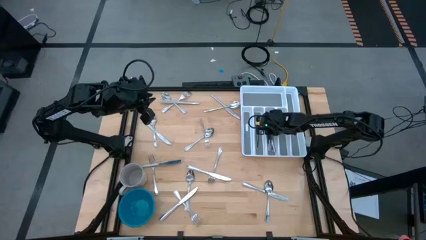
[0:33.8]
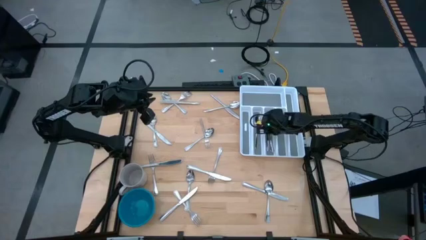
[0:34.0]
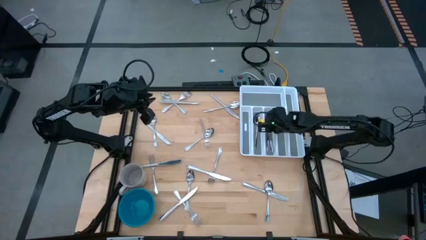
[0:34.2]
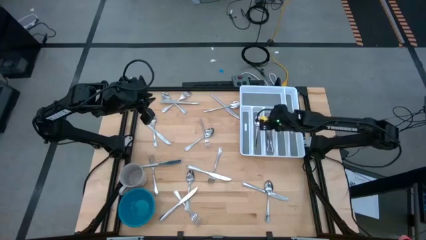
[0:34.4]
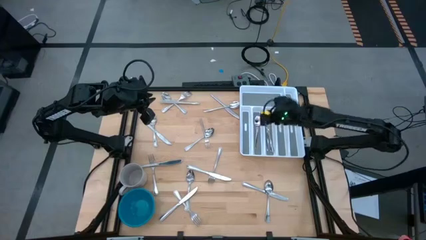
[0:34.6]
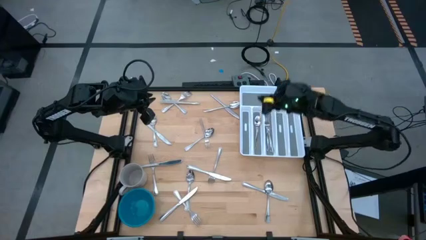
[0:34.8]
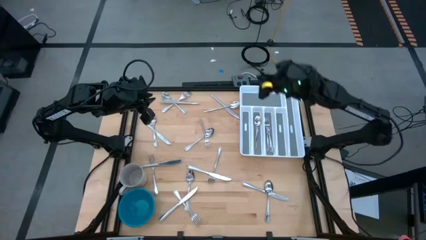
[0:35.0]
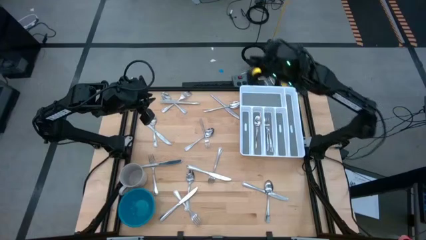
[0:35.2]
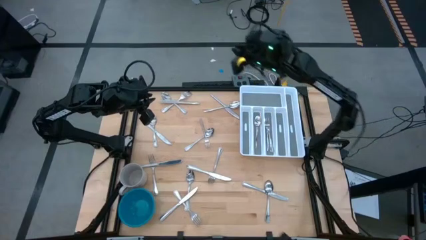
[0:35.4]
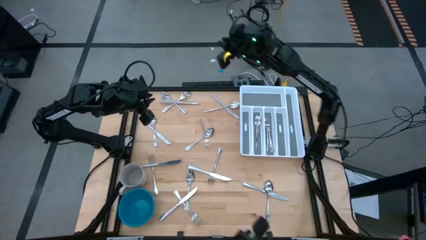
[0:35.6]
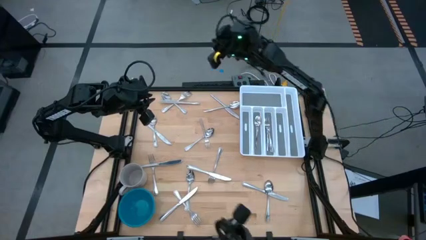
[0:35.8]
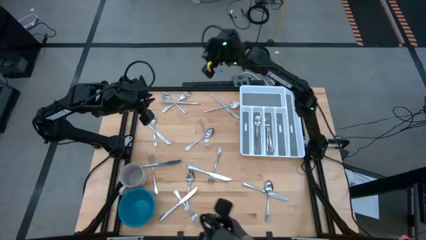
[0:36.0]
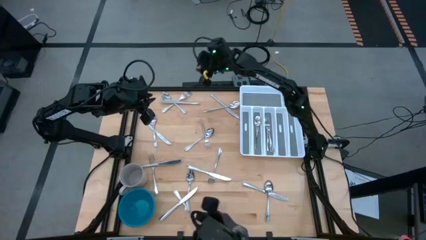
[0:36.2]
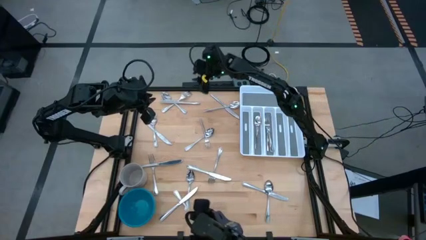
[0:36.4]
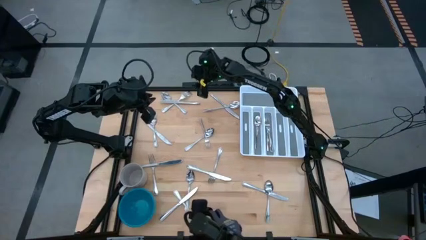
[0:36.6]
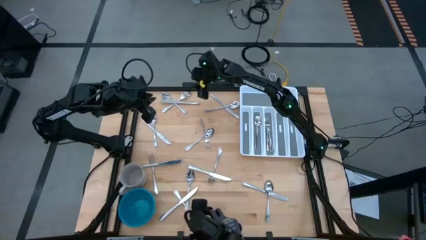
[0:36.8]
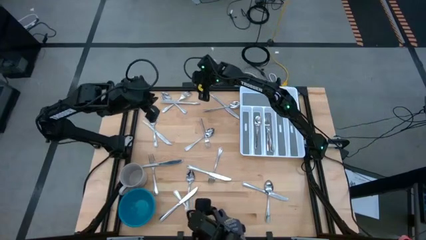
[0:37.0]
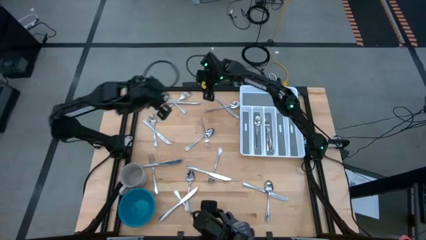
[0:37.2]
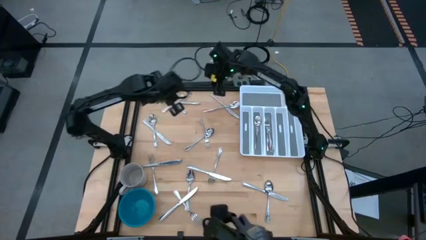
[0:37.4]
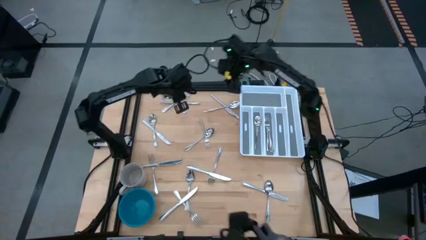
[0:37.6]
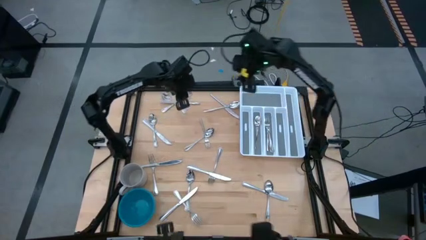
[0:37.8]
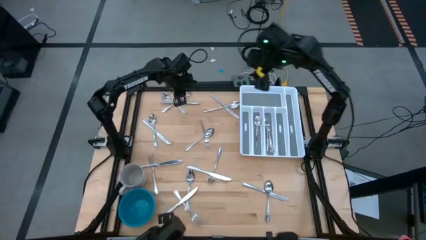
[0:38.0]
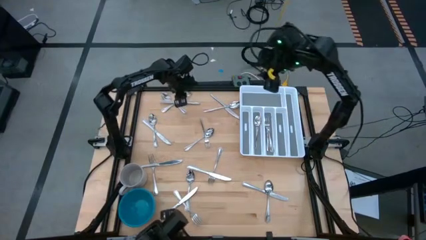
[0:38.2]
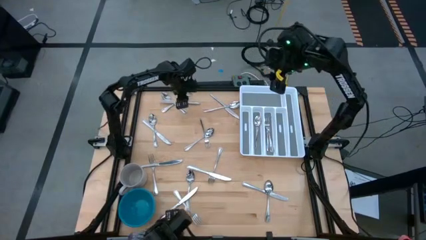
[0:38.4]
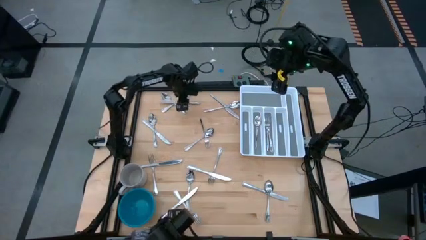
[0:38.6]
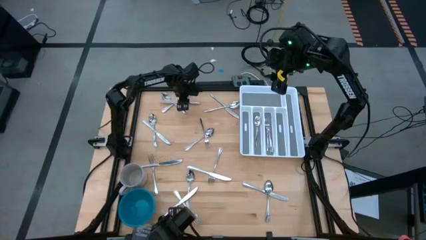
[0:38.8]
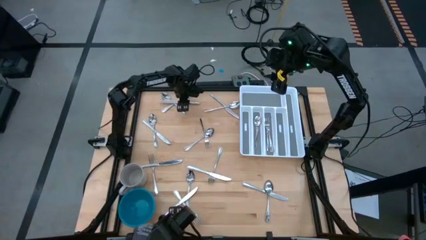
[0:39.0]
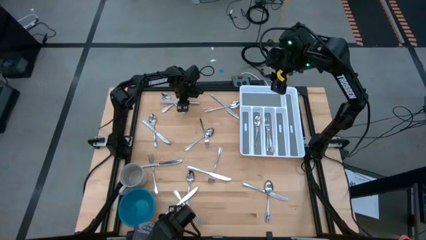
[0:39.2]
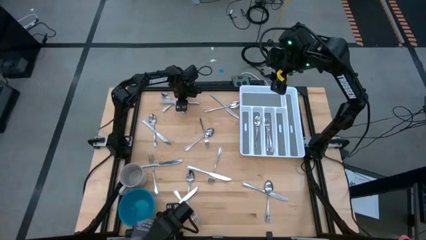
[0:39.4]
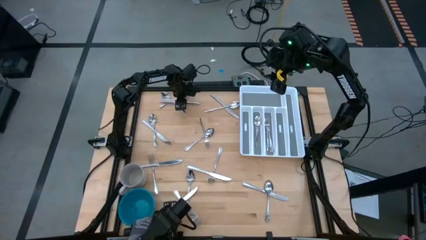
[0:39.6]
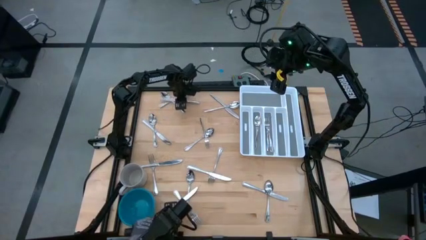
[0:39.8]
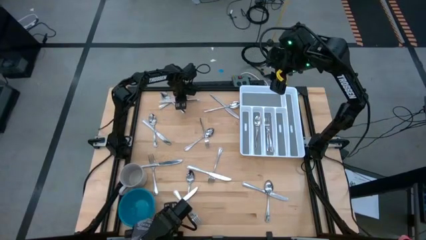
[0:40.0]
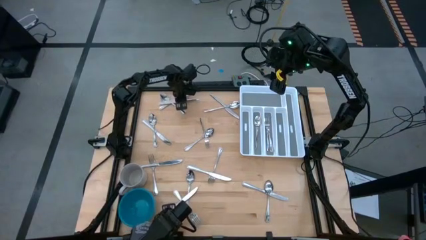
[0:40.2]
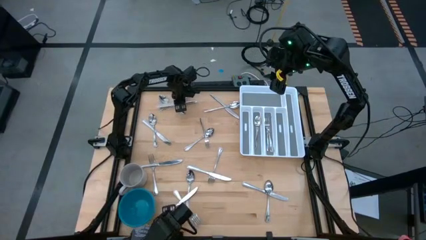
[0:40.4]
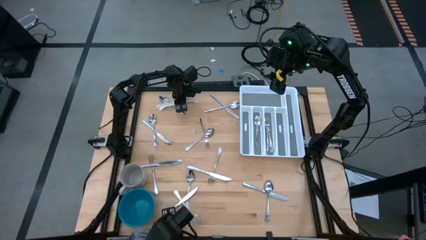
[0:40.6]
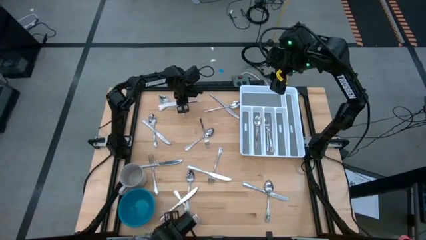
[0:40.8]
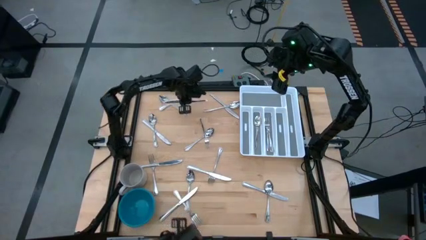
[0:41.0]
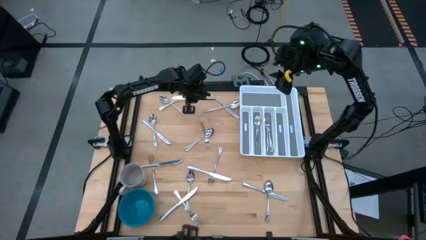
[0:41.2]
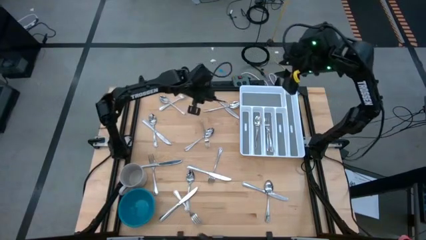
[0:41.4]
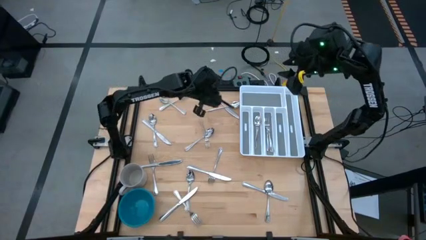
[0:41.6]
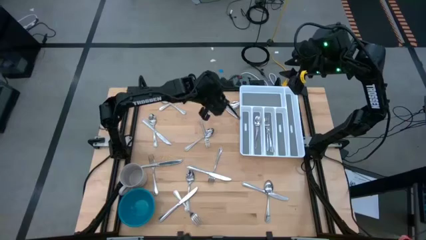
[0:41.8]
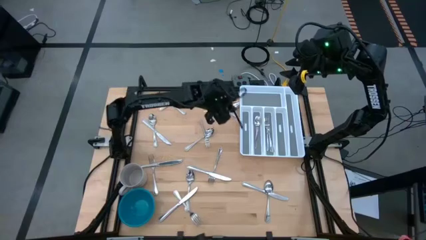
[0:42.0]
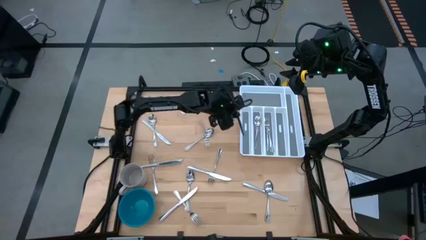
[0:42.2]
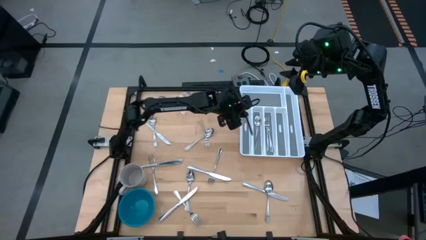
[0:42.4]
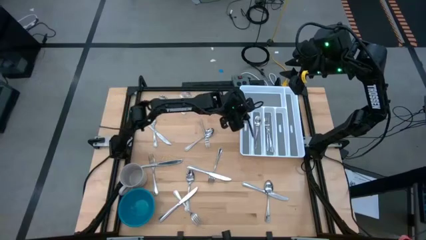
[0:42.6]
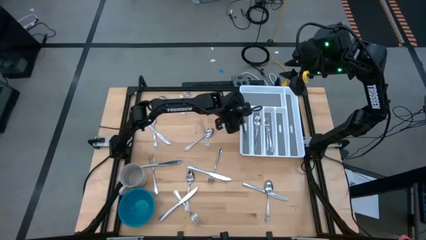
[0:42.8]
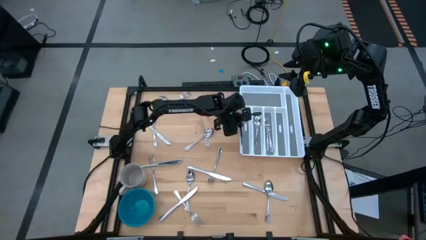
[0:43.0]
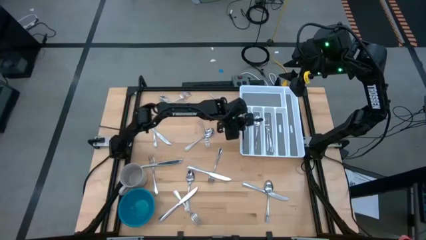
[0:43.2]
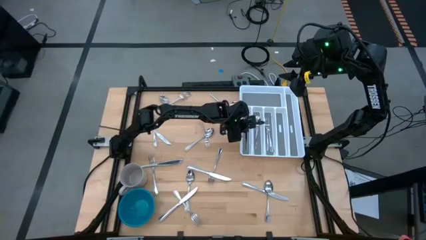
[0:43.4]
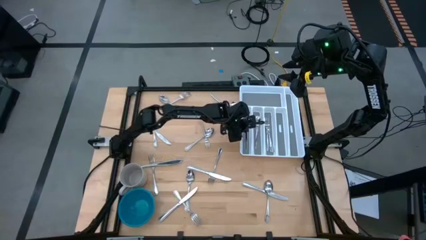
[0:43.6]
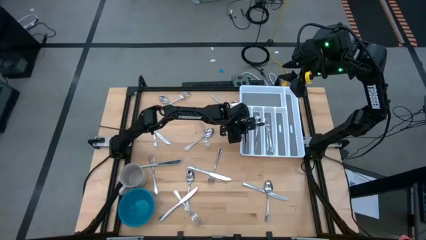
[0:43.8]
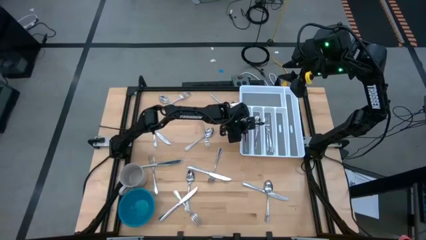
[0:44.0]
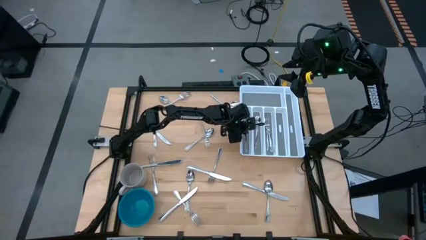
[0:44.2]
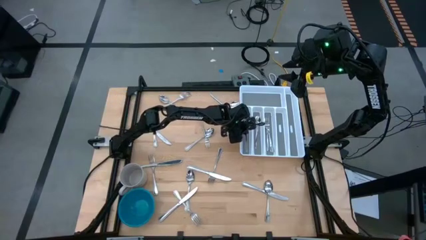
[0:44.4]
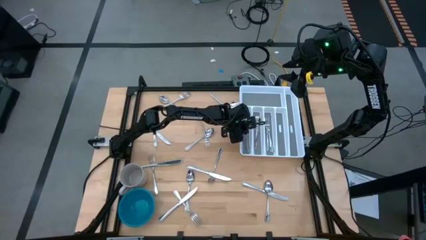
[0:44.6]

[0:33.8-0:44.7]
Task: Sort silverware
Put the table knife into the silverware tray
